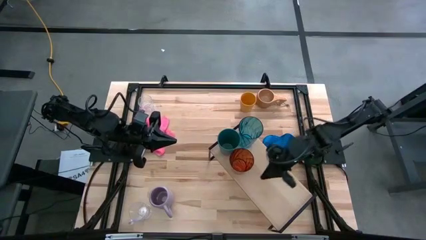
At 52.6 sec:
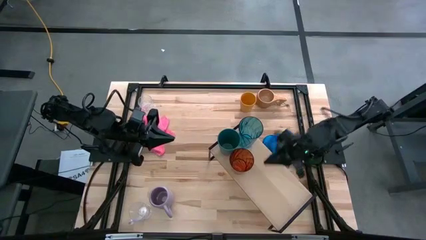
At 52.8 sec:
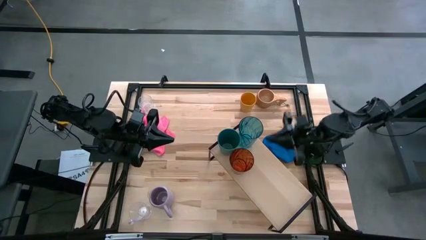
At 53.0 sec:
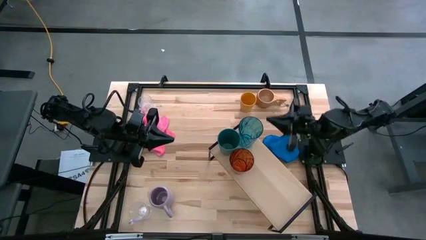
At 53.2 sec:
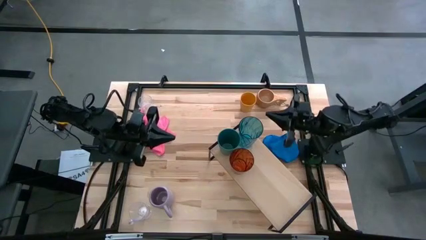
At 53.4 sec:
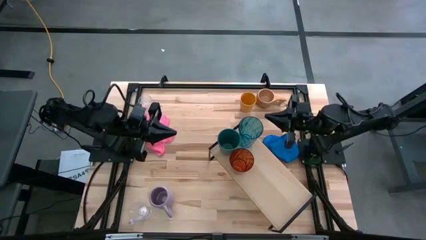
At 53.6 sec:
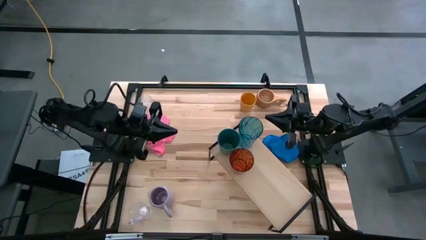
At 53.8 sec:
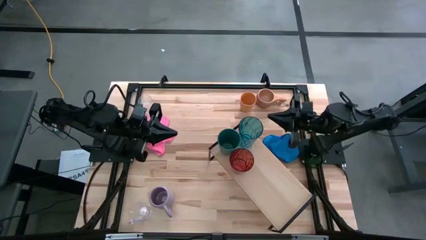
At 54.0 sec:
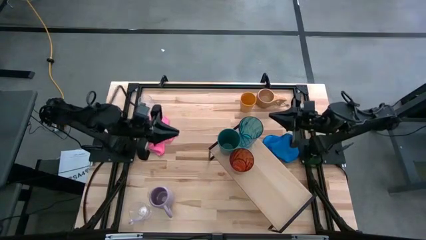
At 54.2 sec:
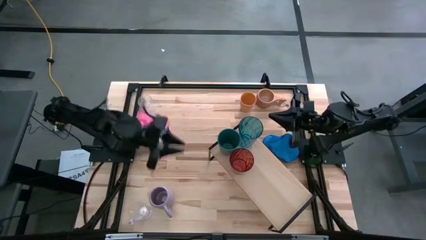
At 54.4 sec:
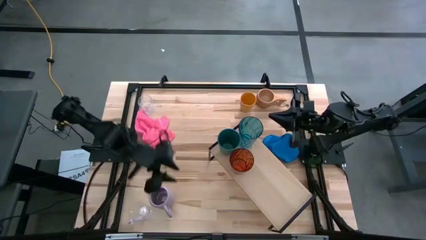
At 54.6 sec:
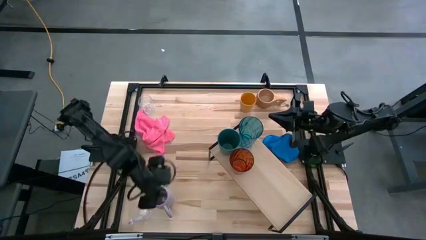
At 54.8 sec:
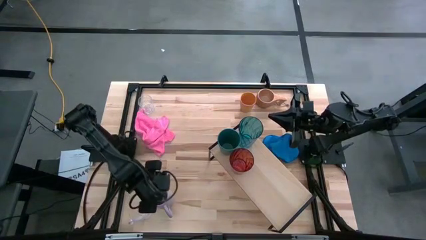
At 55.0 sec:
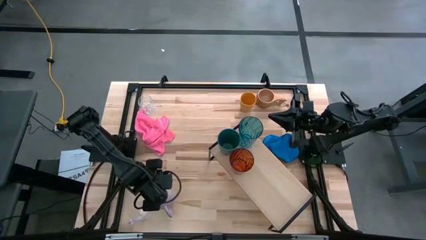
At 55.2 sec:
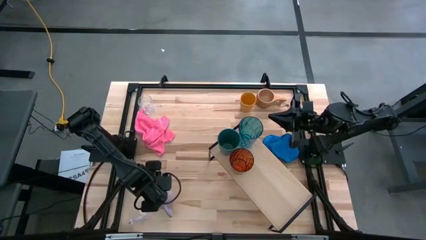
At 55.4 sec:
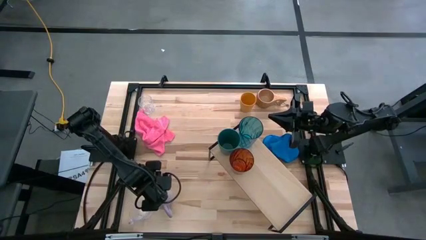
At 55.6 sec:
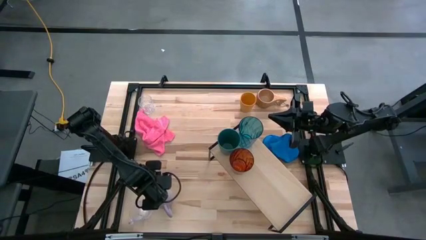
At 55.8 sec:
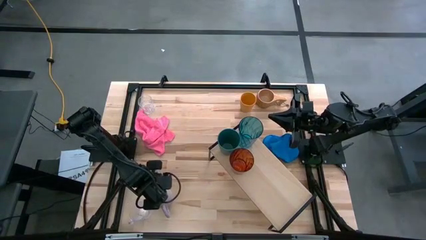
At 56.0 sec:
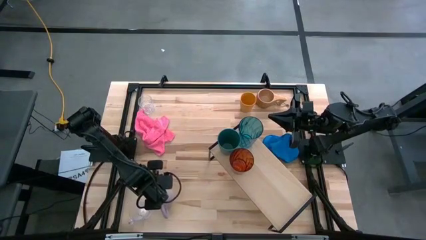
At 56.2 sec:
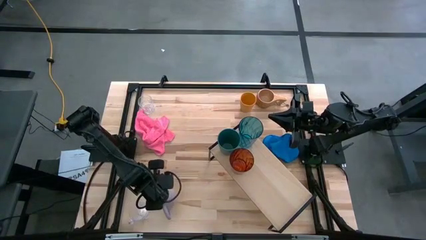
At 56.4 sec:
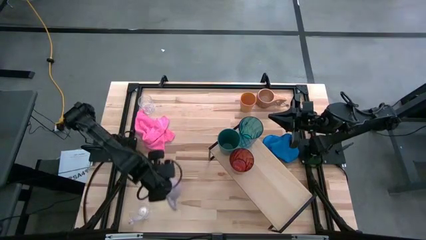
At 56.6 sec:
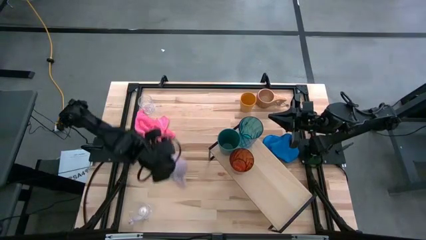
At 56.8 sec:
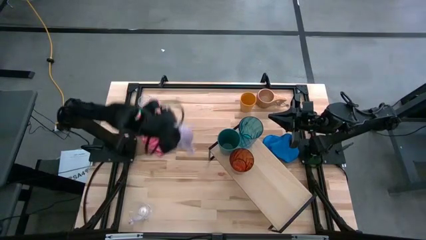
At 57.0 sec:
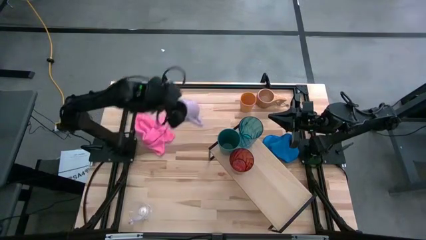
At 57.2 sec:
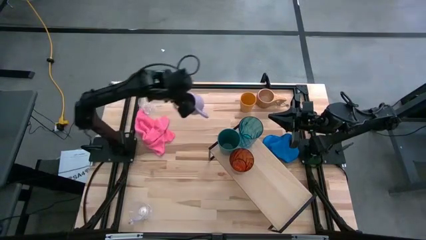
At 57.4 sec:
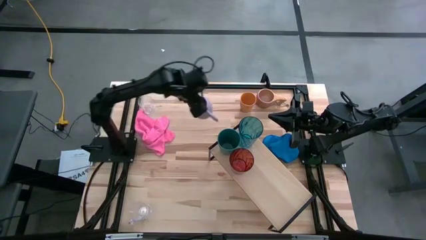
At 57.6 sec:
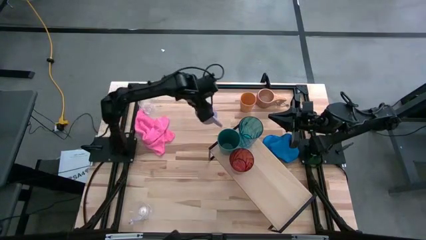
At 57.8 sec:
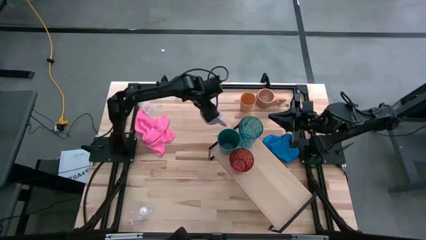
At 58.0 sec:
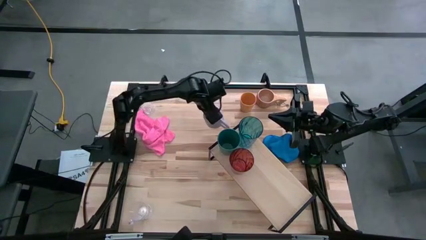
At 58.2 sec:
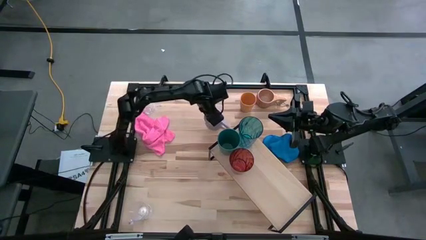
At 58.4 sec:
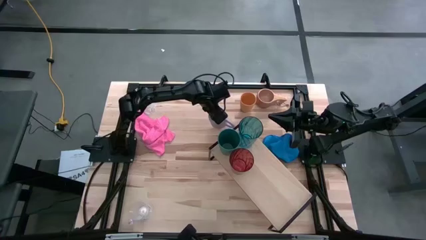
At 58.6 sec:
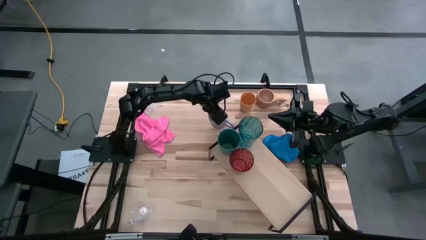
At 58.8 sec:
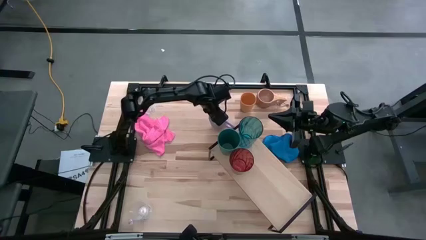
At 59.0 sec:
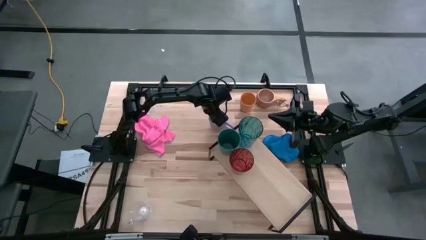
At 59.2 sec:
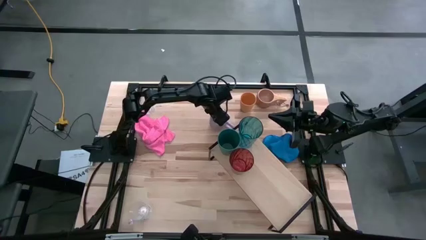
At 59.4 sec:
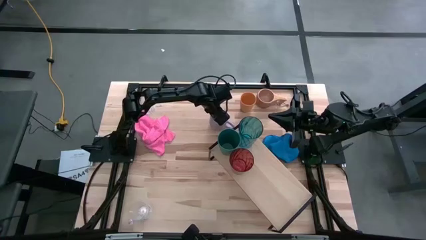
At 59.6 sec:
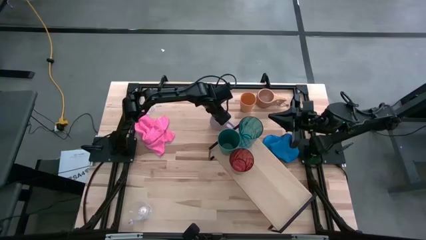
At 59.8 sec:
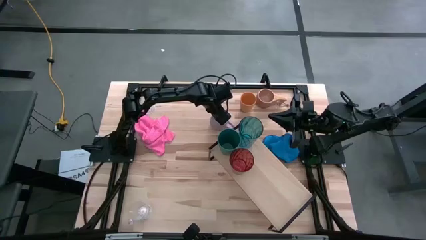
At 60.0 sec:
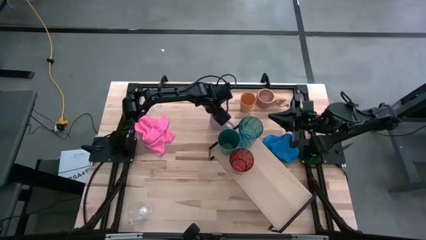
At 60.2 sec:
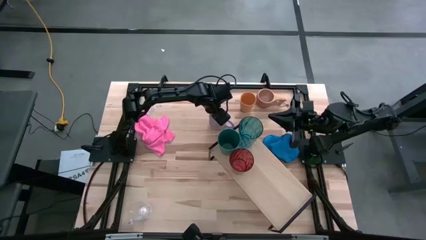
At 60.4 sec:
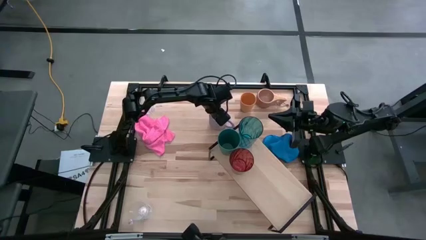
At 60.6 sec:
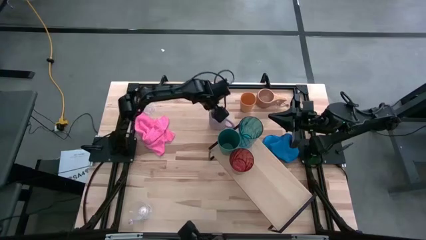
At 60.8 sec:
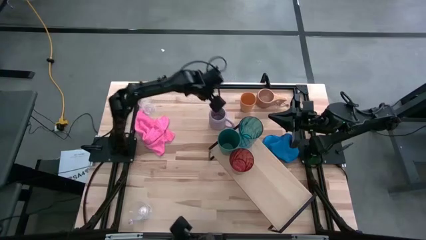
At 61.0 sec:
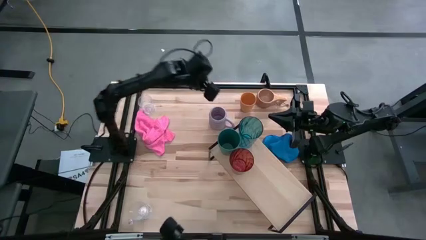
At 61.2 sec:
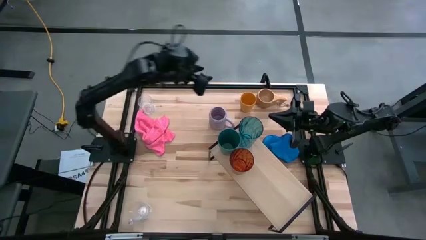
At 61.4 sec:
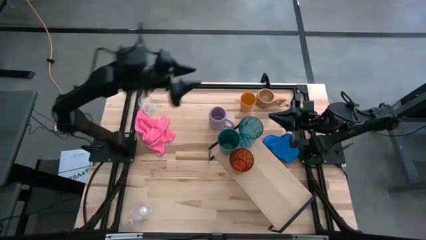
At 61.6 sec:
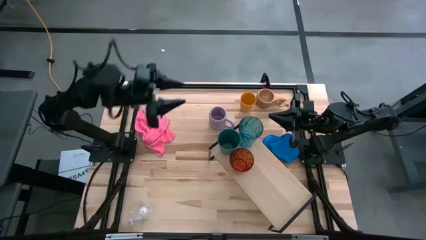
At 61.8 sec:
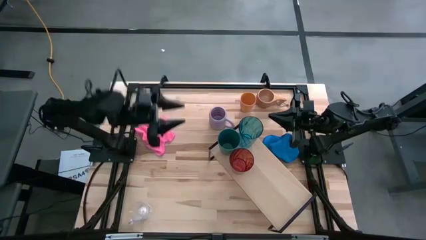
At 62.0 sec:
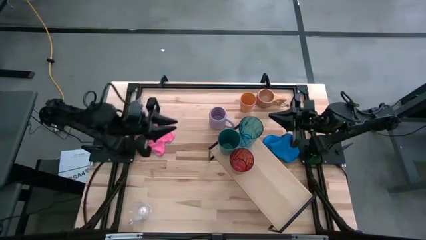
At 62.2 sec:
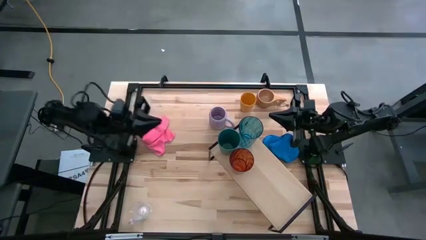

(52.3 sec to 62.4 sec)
Task: Stack small to large cups/mugs on shelf
Put the purple mug on the shelf
